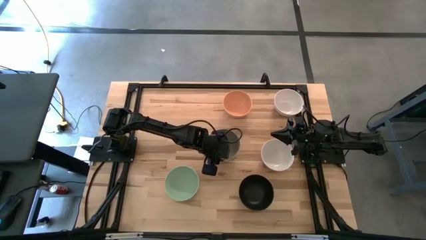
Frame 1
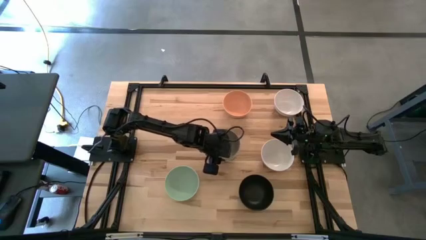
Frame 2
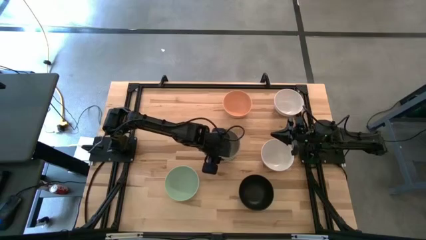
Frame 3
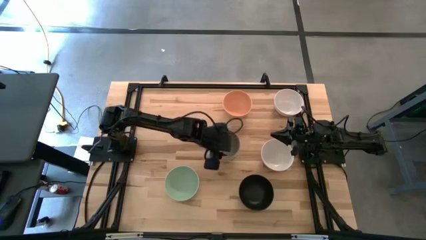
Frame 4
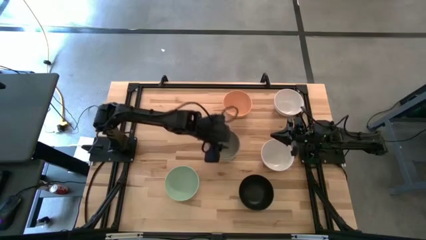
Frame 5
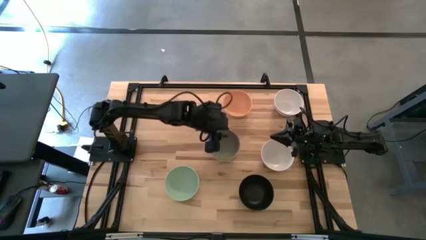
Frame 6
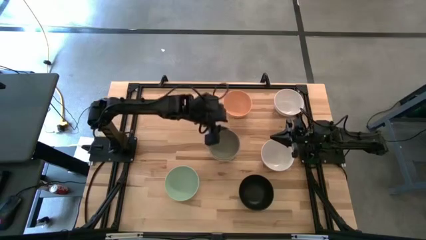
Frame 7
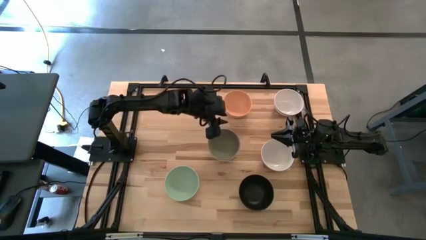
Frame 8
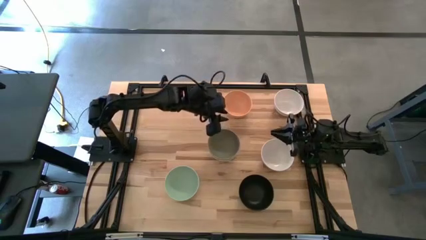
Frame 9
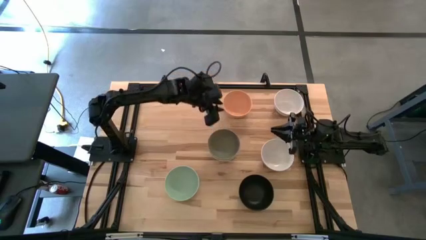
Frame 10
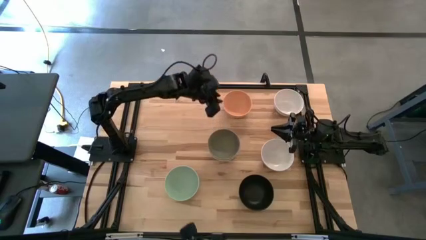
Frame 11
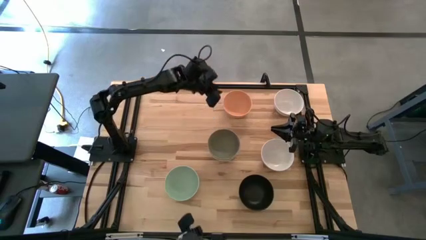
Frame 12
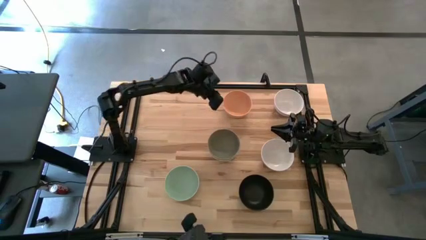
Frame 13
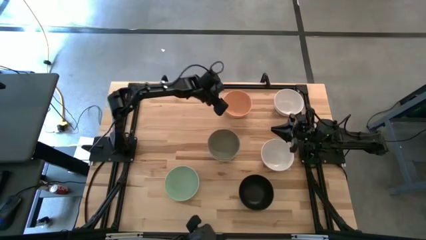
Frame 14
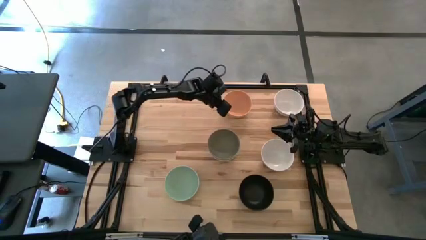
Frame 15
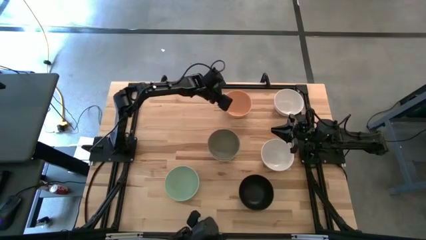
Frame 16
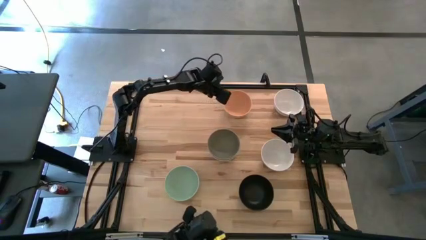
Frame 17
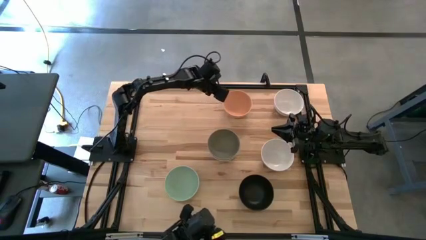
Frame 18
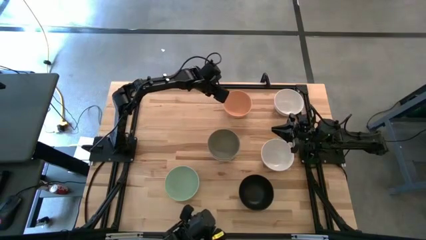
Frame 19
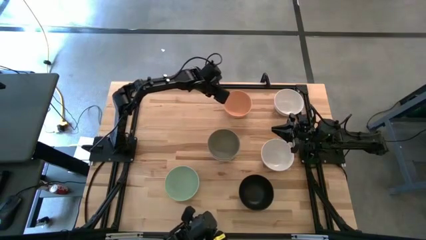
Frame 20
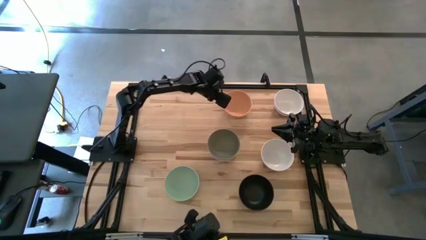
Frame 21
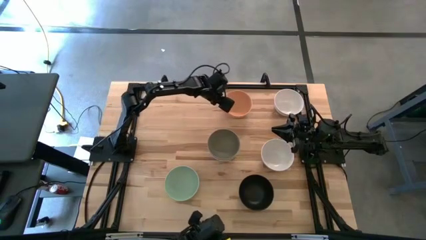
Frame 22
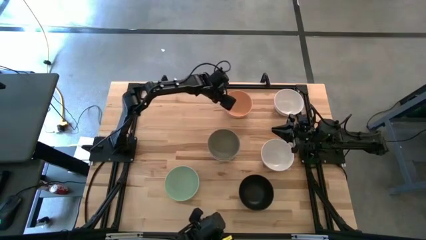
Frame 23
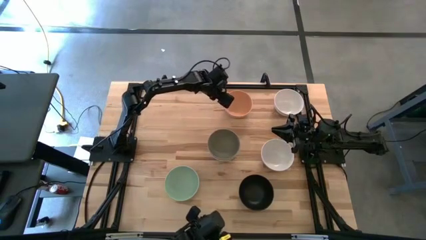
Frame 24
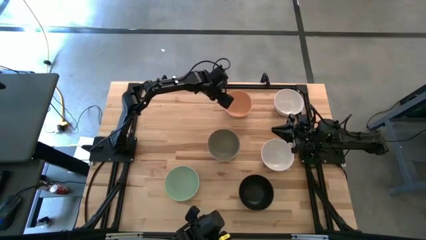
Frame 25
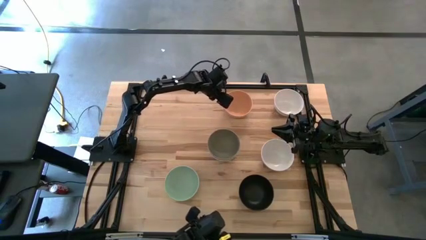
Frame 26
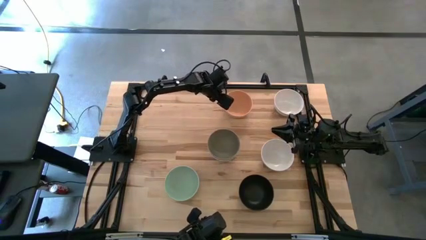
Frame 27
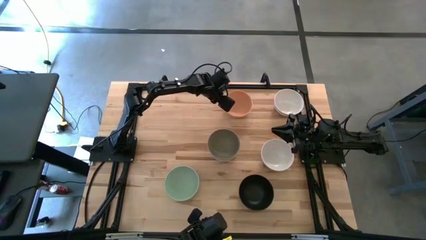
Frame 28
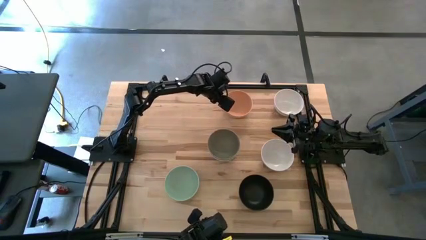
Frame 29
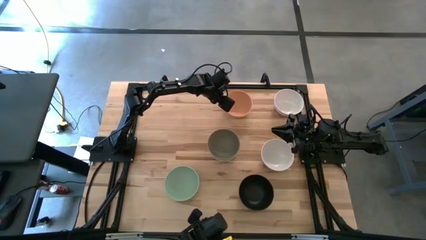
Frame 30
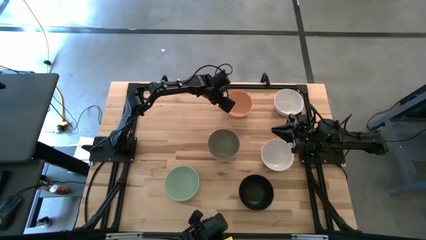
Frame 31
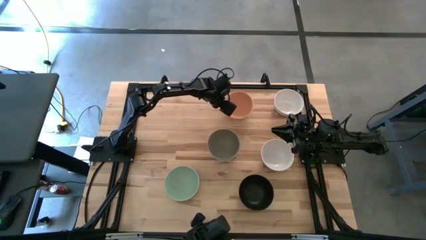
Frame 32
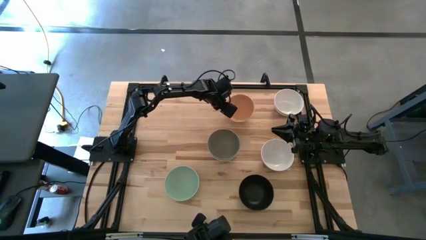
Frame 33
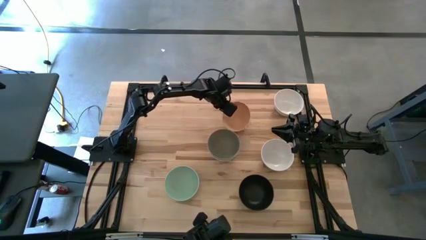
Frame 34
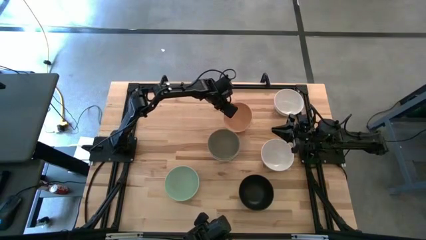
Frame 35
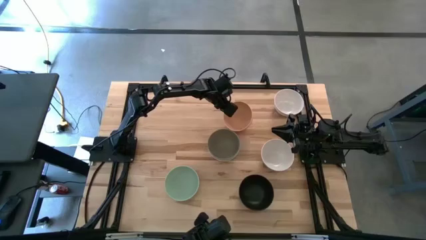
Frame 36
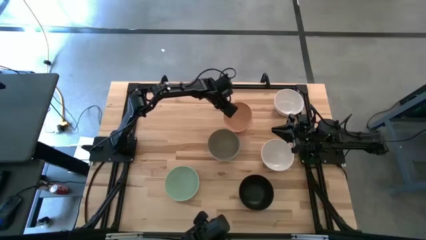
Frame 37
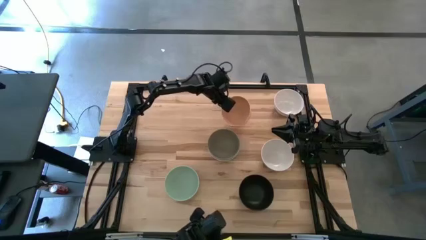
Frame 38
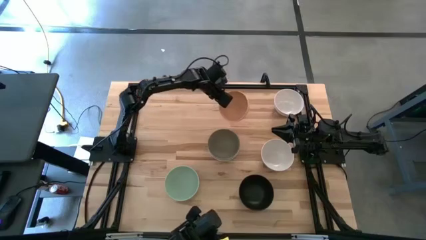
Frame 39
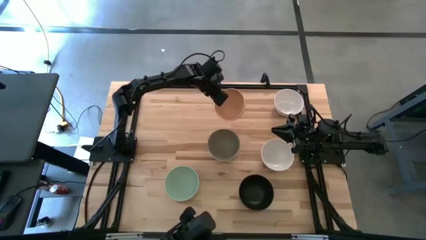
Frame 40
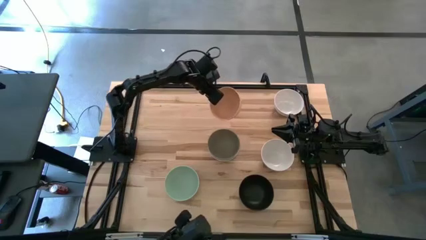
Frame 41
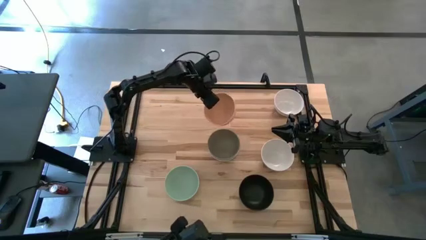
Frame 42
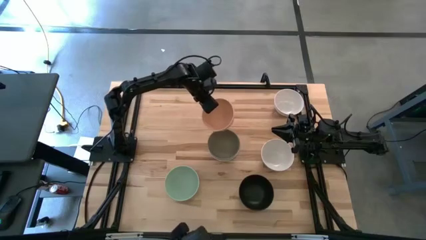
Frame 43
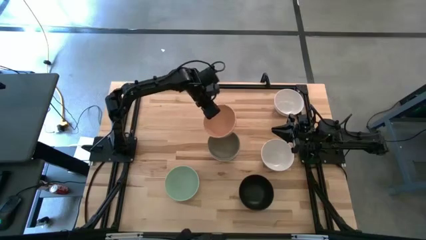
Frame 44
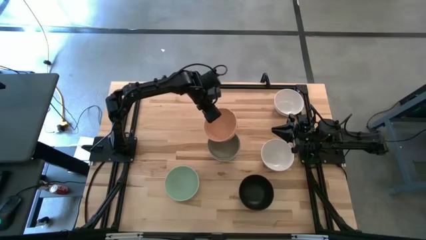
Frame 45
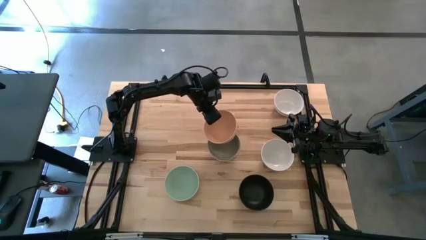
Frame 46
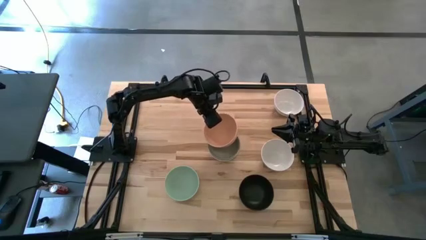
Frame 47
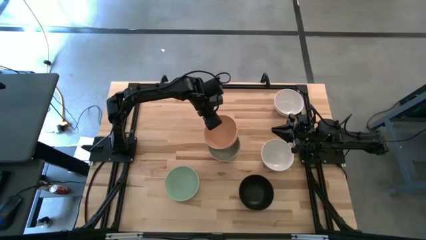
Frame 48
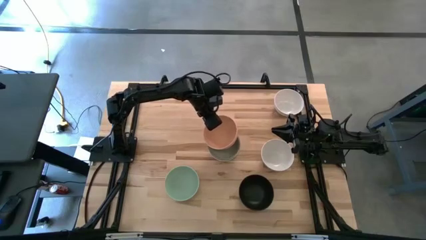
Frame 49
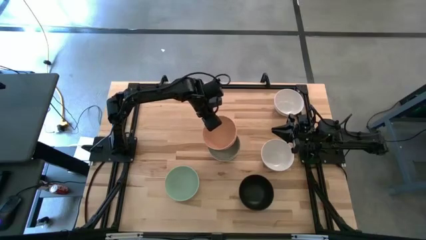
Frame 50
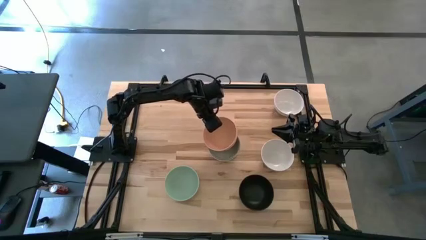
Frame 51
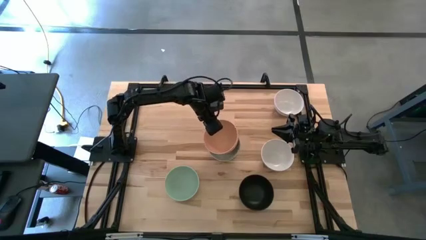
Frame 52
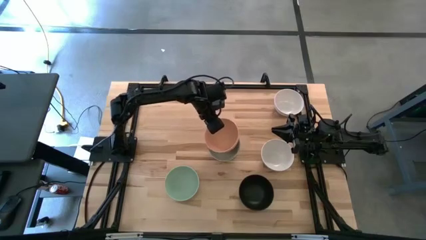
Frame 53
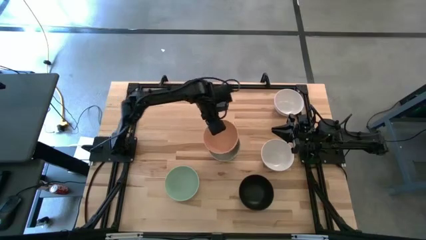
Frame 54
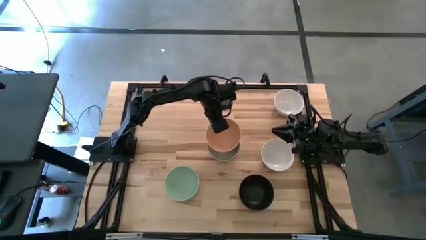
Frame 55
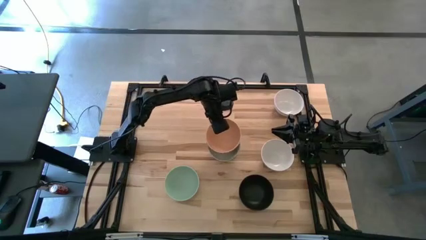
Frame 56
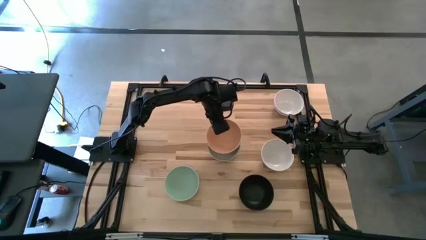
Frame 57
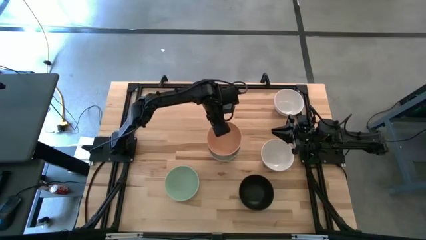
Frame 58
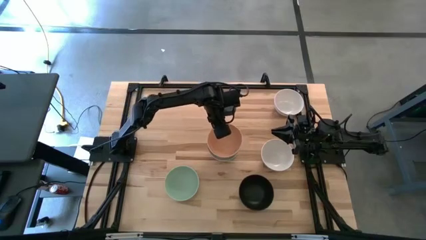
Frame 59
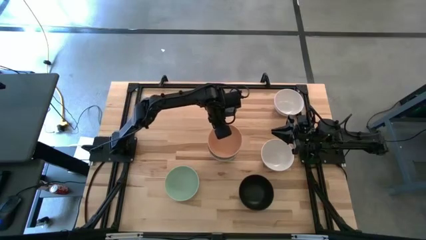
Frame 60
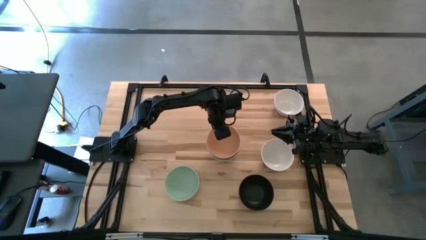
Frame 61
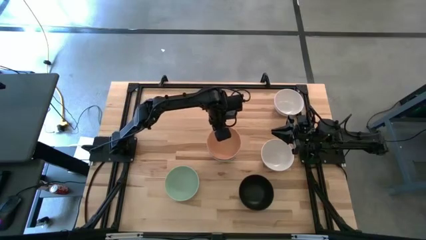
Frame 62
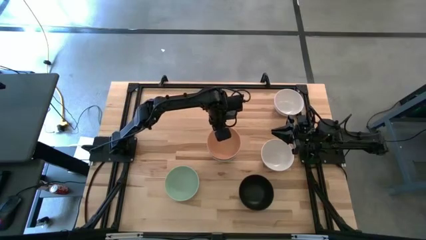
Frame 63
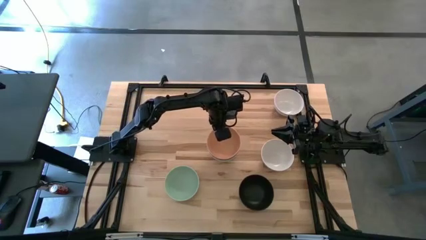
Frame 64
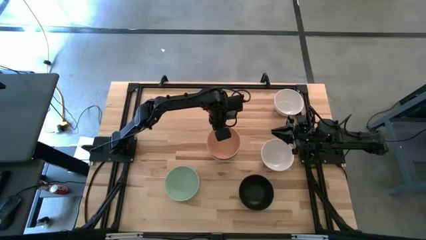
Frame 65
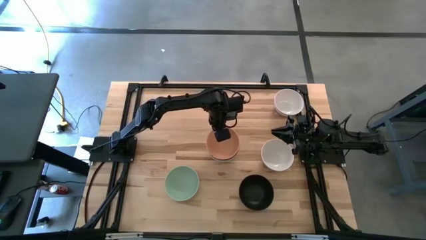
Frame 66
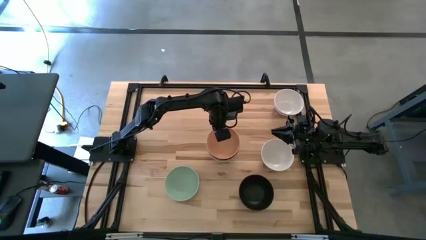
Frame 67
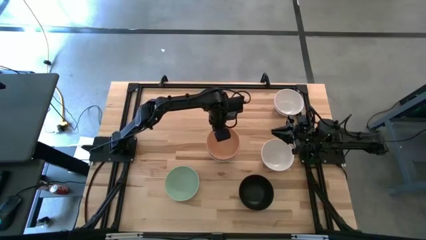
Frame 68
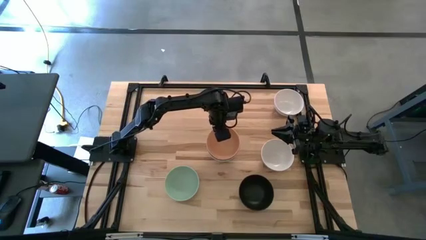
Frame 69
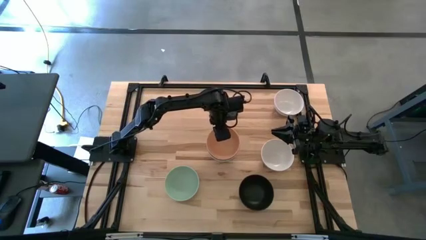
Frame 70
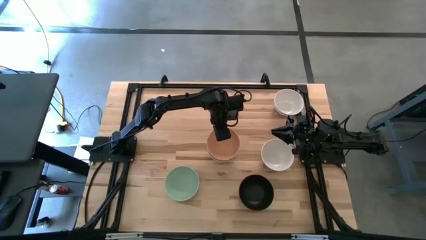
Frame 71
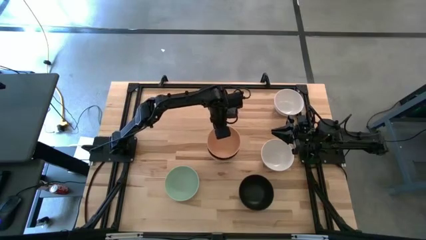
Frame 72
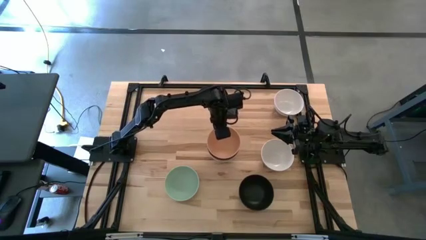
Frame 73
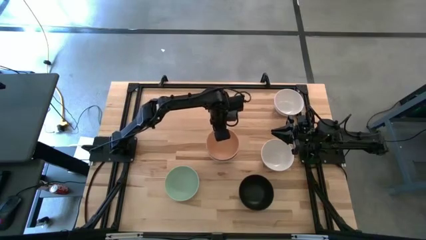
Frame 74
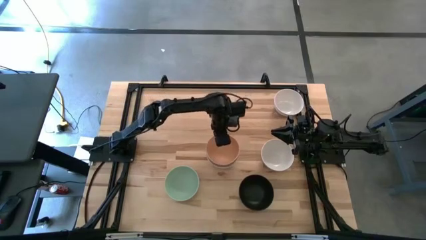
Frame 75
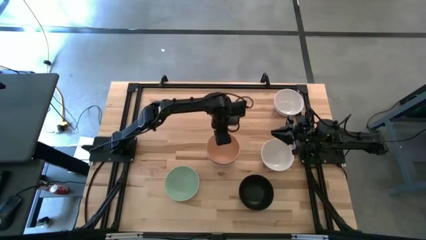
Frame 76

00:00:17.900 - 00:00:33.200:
Task: Nest bowls inside each other
Stack the orange bowl on the gray bowl
